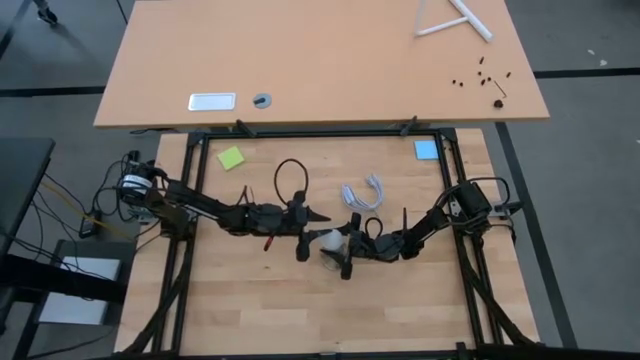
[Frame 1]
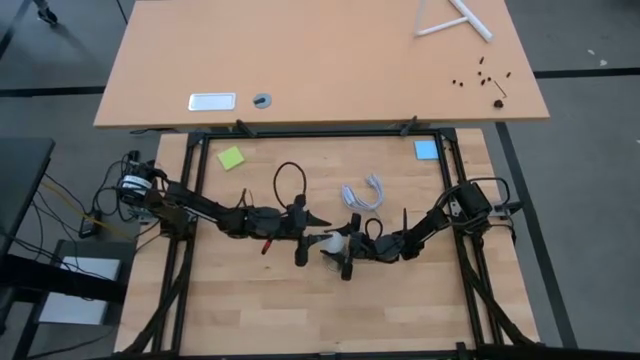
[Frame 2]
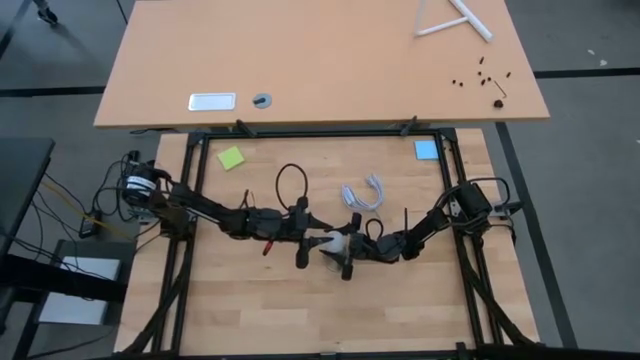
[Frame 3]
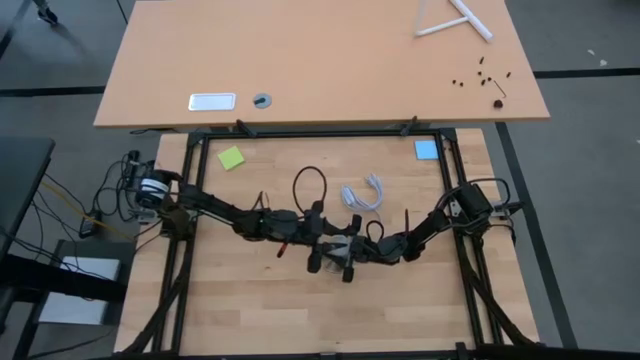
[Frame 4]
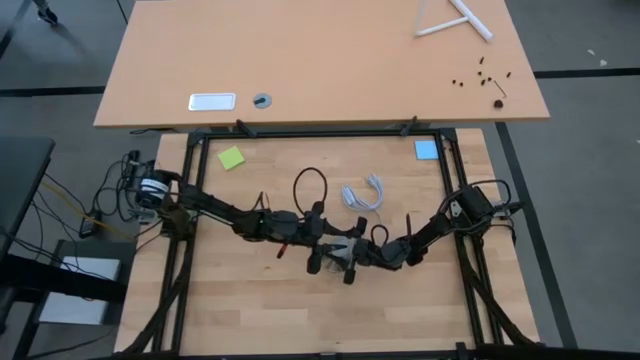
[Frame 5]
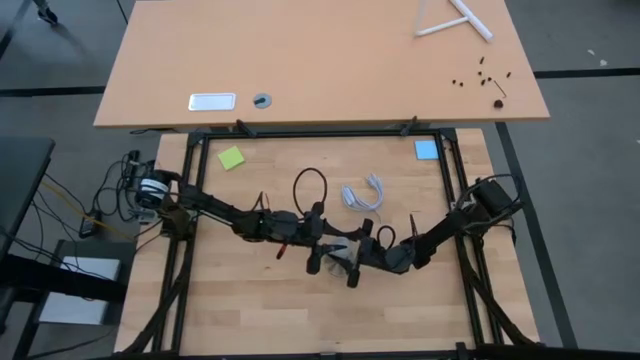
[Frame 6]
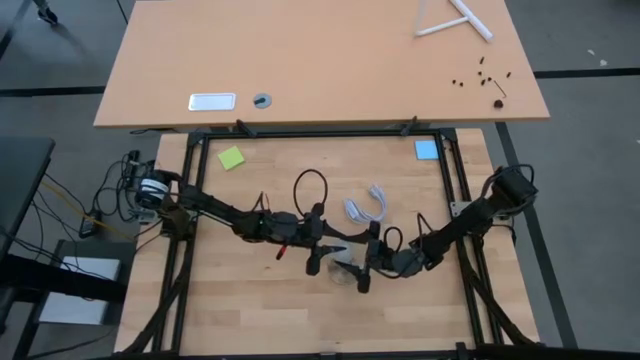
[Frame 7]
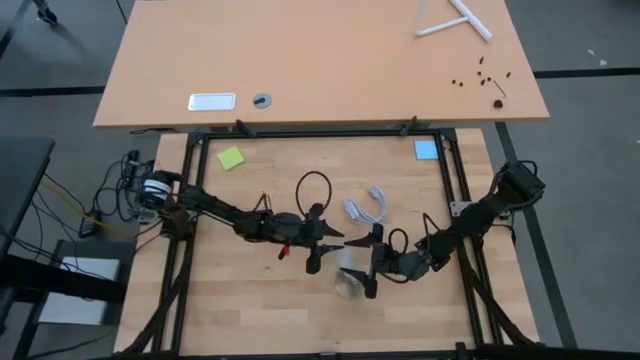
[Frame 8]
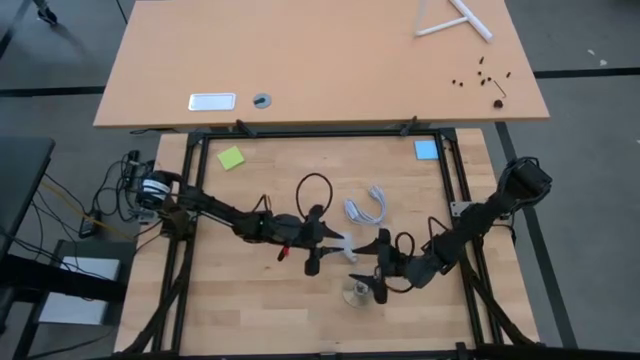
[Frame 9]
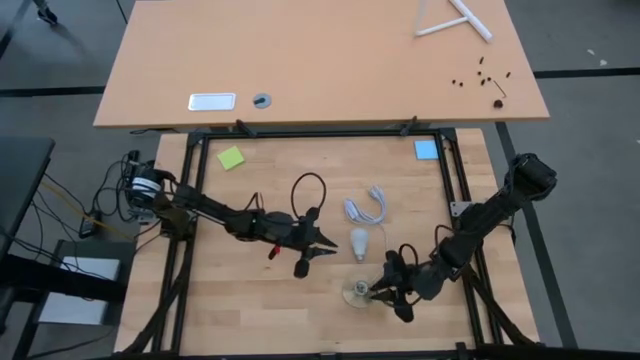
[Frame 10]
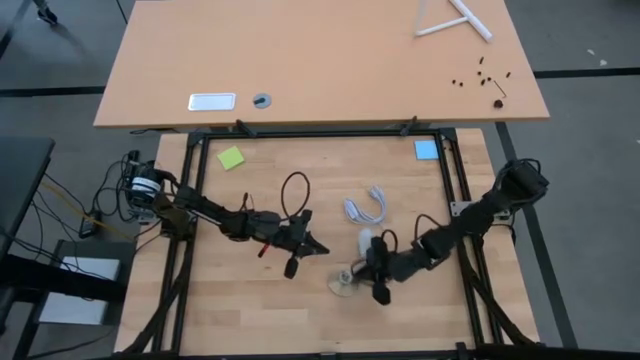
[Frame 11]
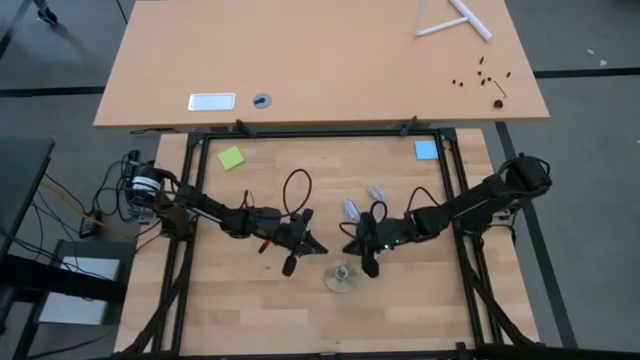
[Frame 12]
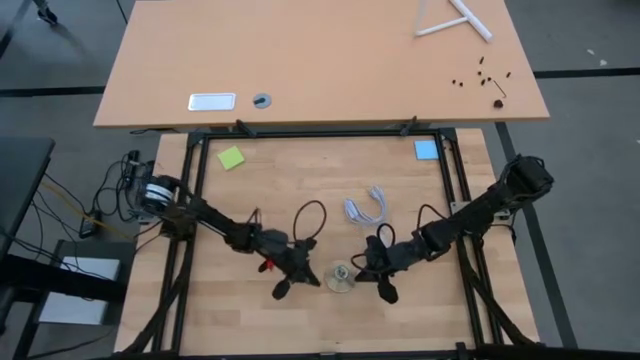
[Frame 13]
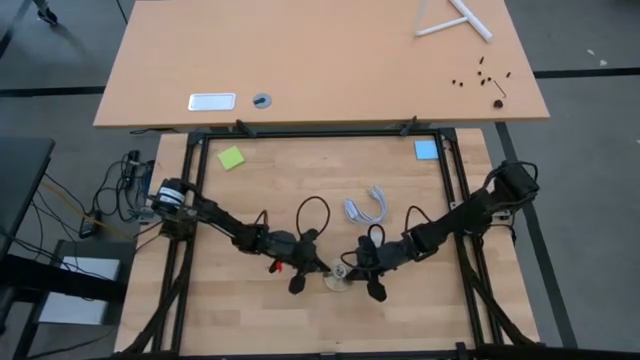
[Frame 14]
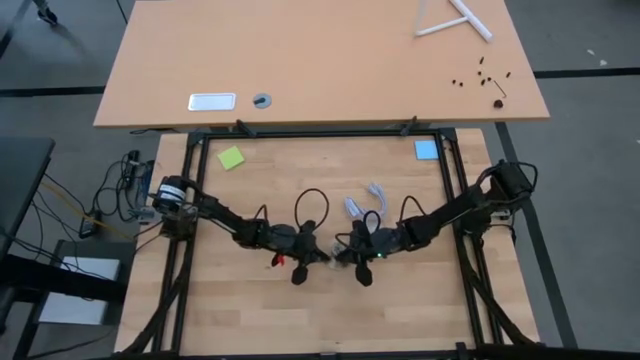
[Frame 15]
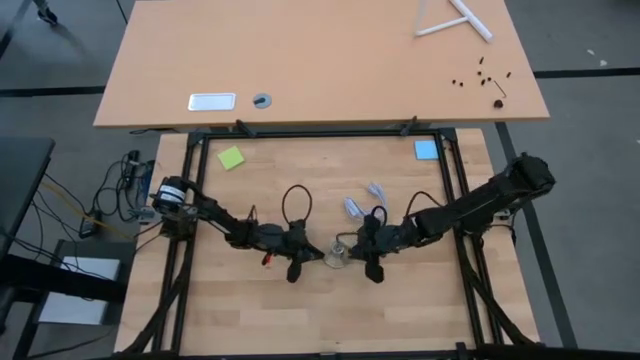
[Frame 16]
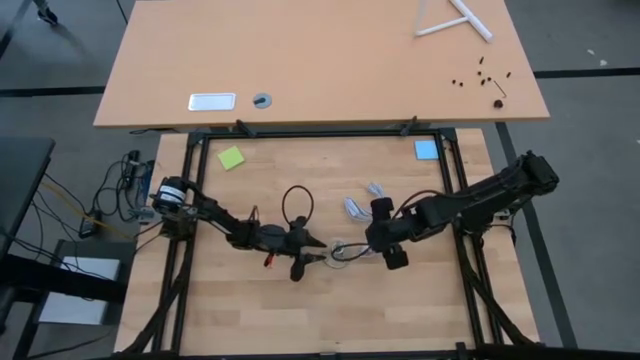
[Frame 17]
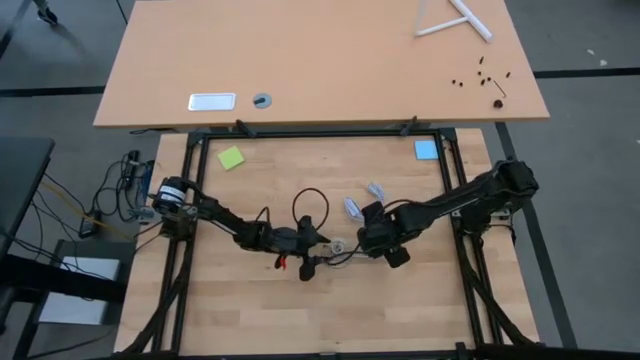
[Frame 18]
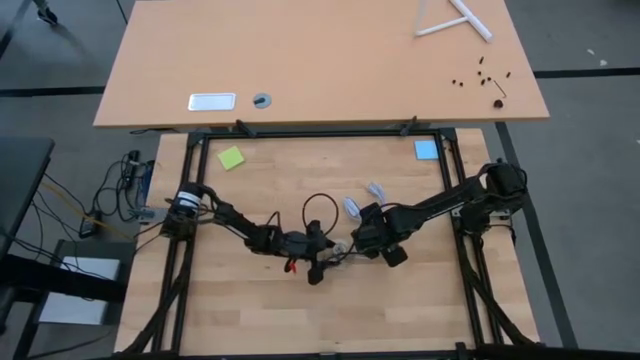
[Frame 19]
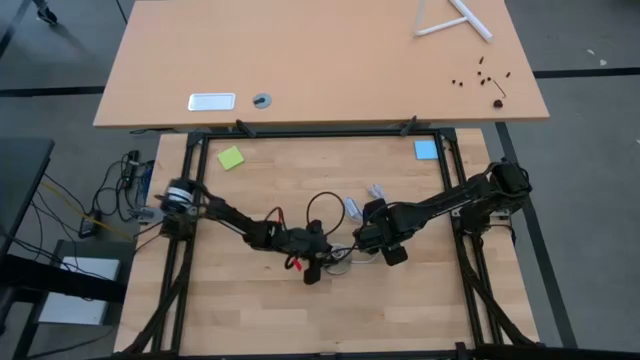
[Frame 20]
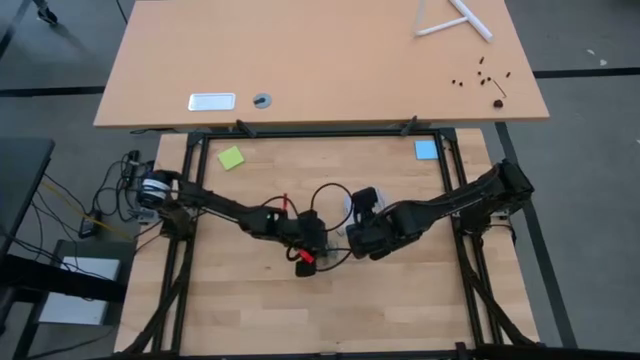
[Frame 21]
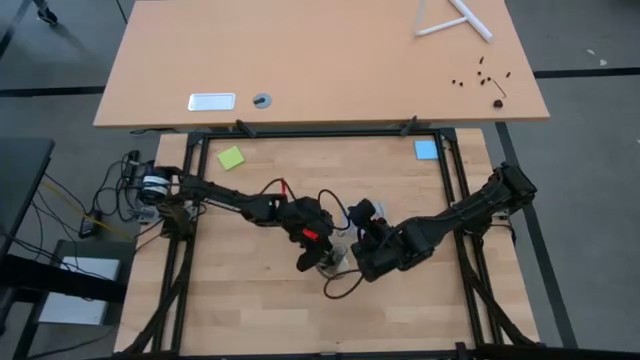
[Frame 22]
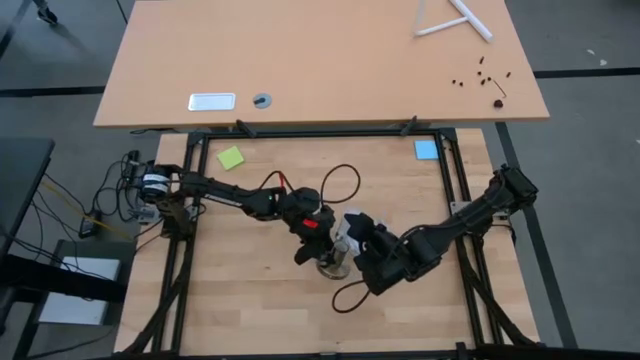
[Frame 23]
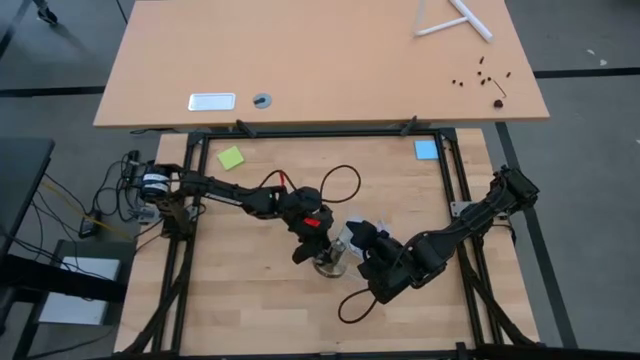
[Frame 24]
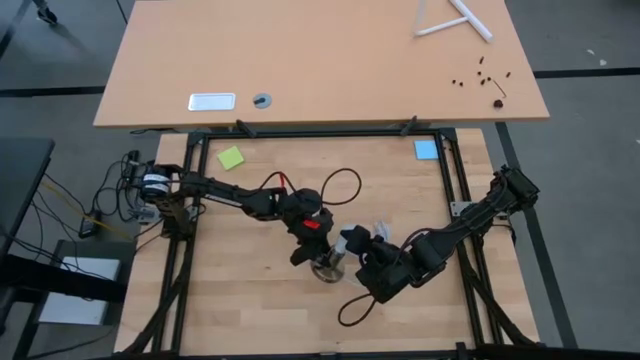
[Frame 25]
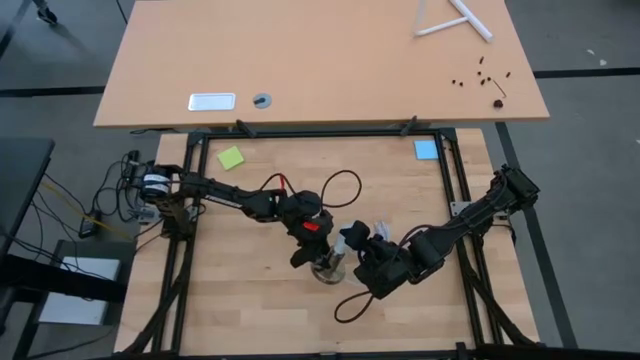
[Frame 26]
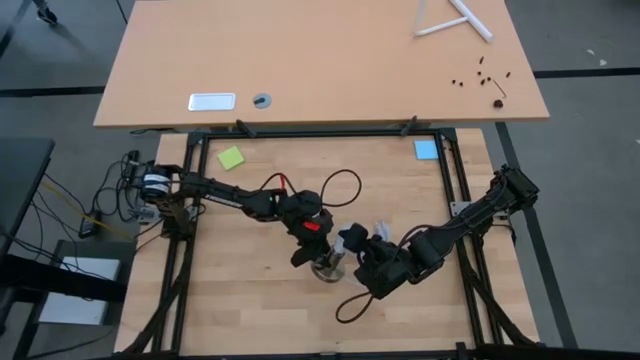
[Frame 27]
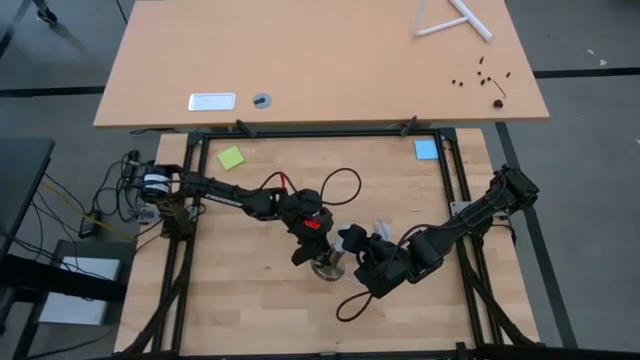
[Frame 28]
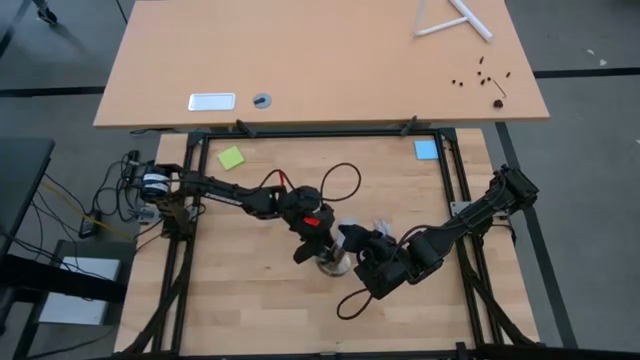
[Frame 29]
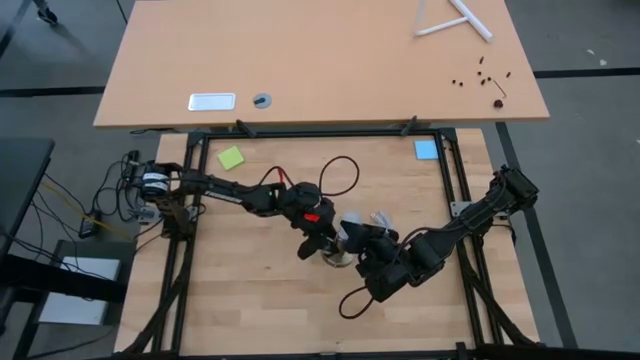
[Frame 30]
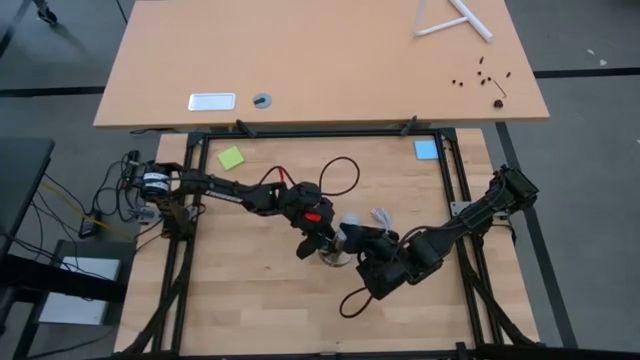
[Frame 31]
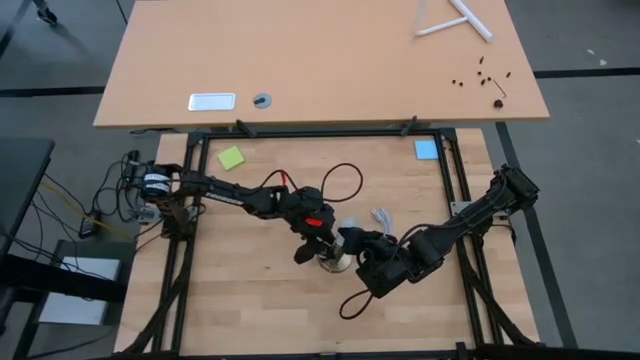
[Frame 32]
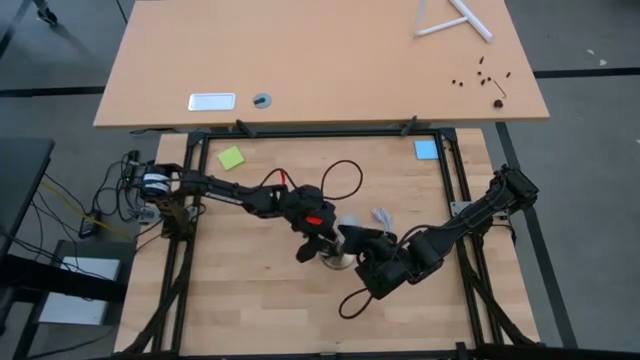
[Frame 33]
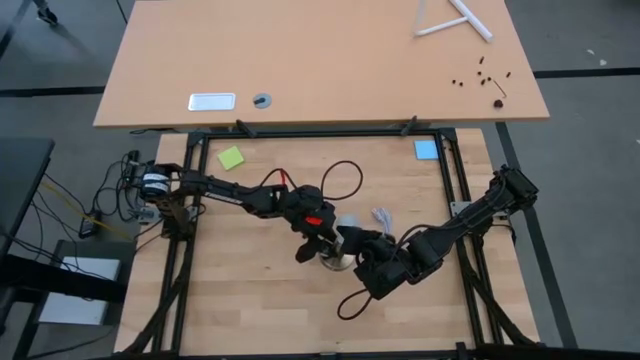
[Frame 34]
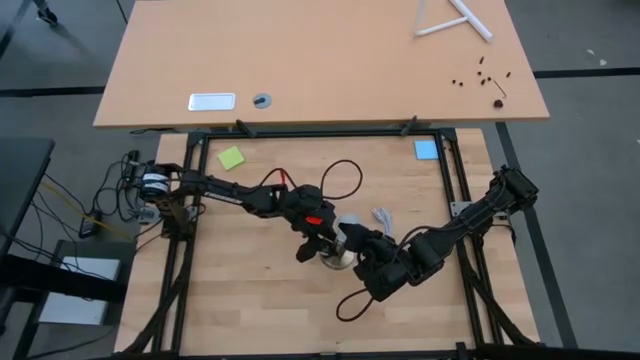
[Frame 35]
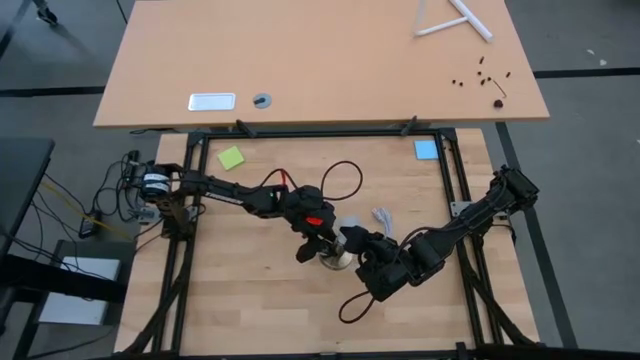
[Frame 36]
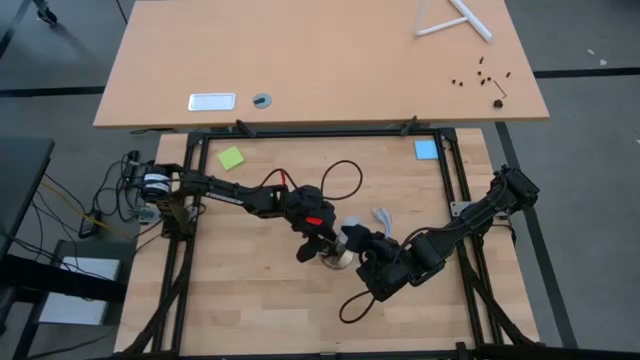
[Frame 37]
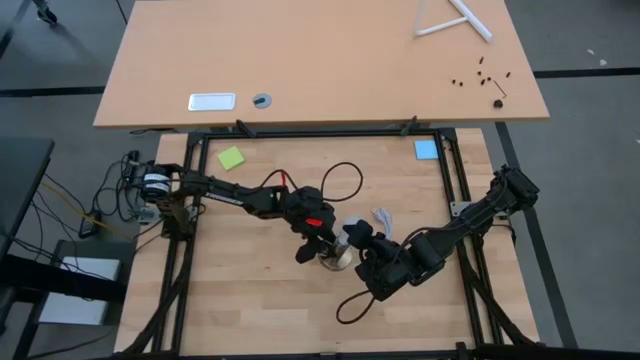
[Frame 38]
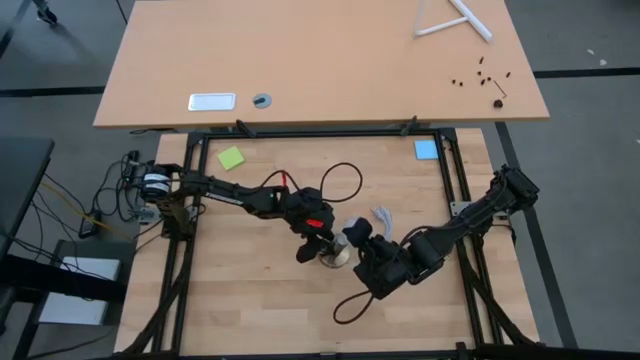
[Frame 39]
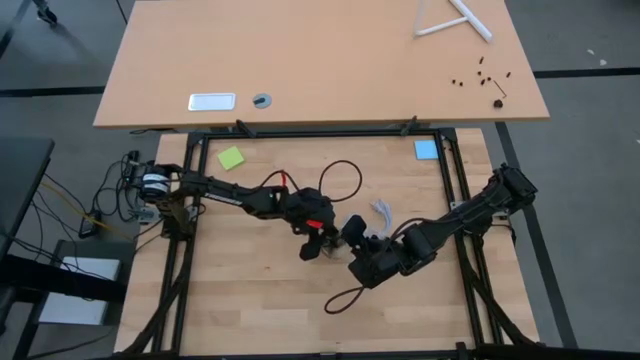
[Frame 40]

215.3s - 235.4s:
Task: Screw lightbulb
Insert the lightbulb into the lamp
